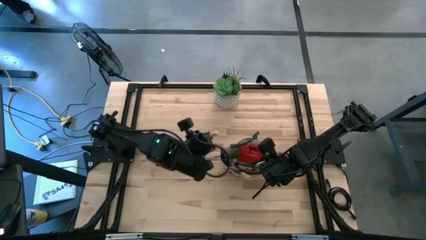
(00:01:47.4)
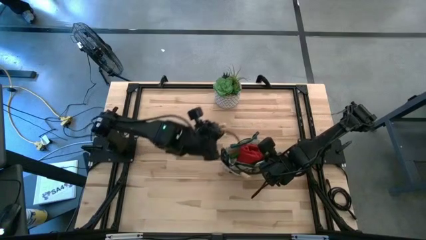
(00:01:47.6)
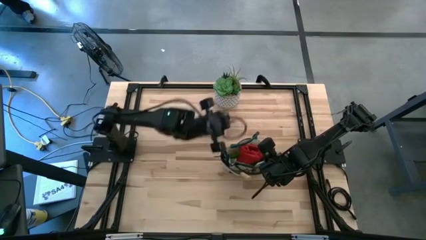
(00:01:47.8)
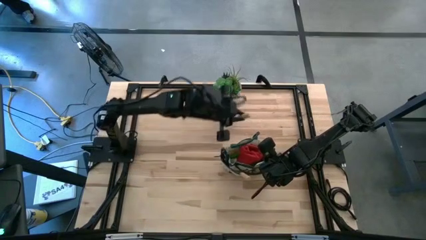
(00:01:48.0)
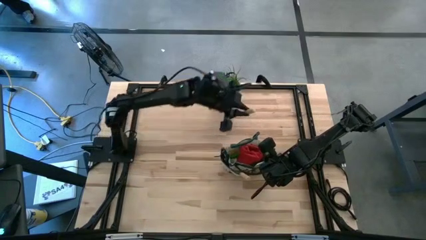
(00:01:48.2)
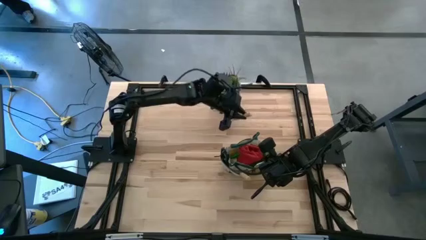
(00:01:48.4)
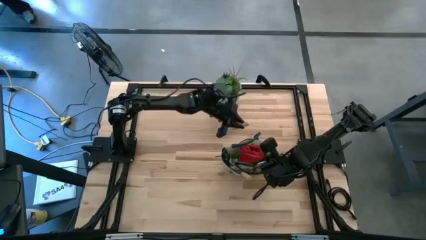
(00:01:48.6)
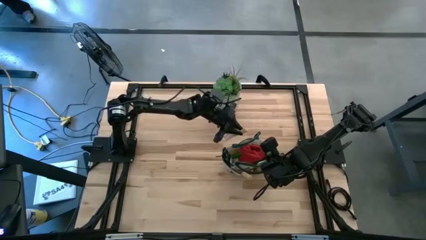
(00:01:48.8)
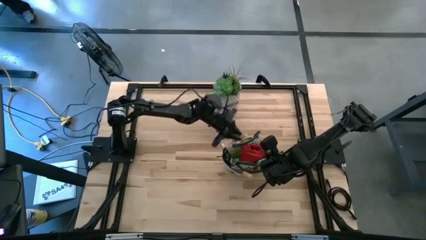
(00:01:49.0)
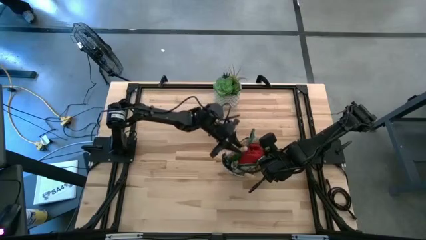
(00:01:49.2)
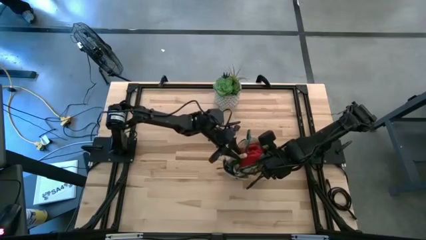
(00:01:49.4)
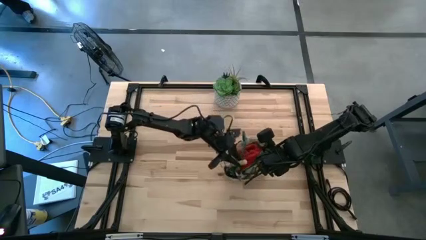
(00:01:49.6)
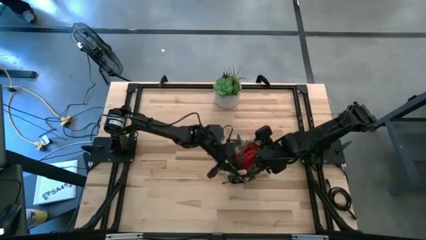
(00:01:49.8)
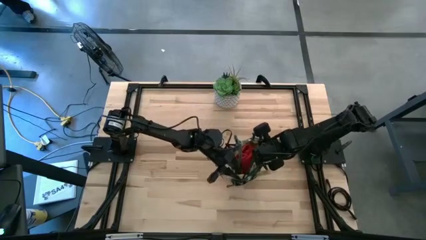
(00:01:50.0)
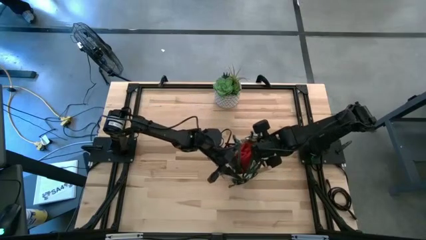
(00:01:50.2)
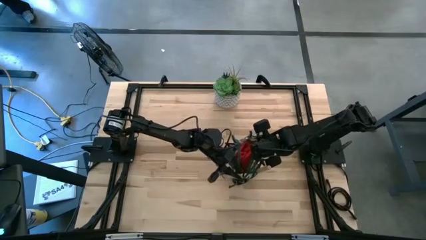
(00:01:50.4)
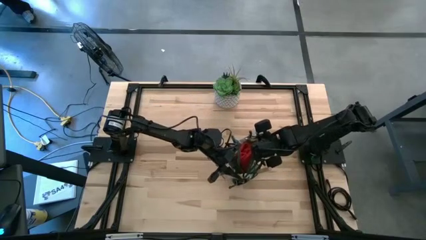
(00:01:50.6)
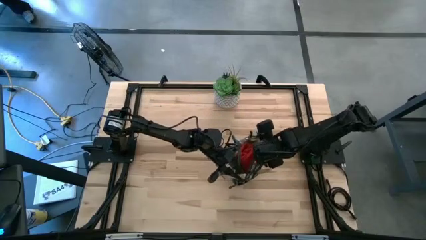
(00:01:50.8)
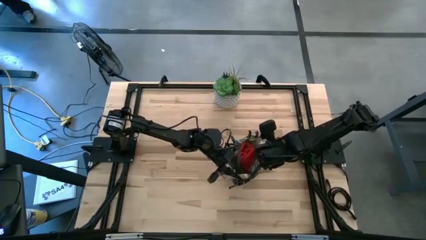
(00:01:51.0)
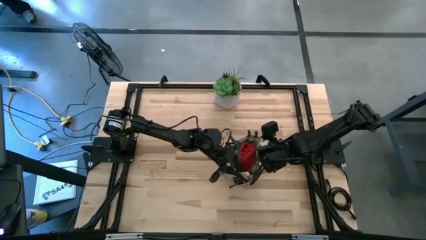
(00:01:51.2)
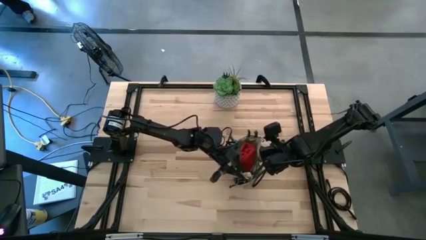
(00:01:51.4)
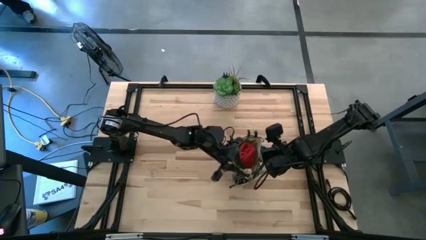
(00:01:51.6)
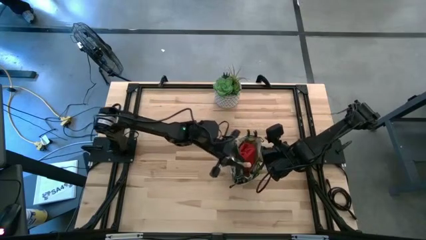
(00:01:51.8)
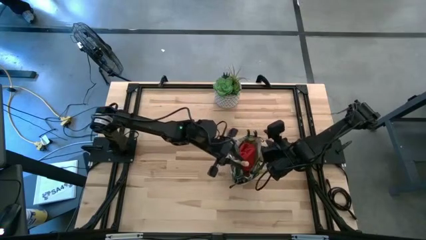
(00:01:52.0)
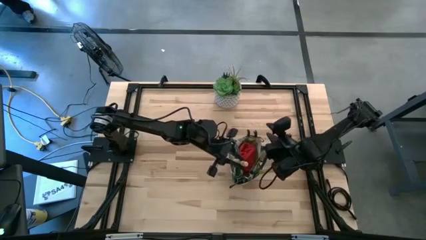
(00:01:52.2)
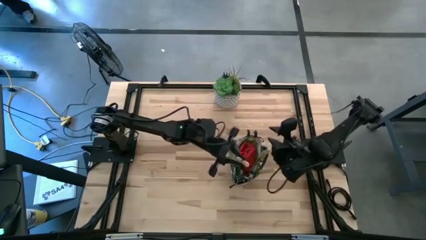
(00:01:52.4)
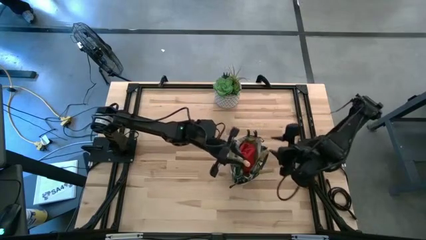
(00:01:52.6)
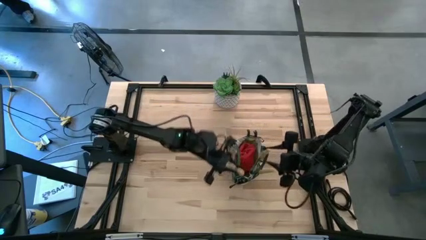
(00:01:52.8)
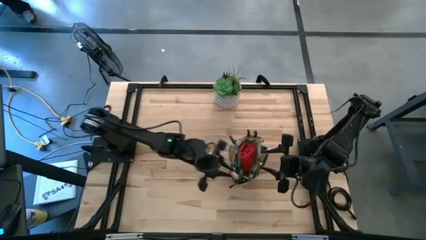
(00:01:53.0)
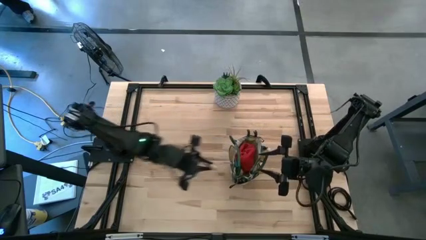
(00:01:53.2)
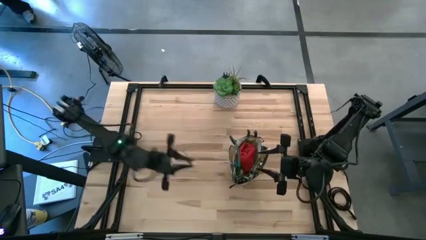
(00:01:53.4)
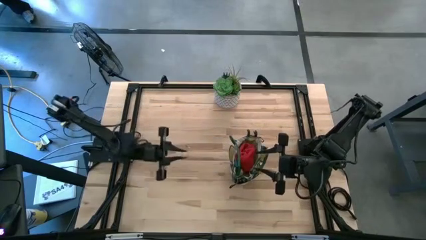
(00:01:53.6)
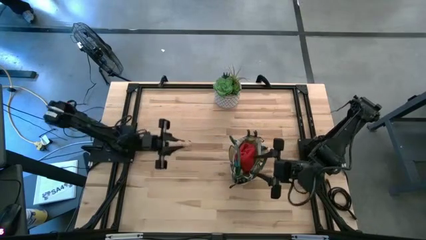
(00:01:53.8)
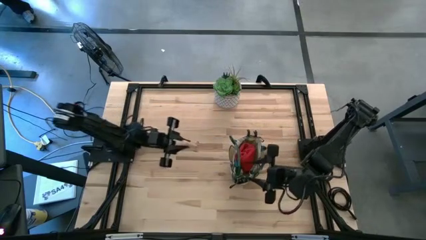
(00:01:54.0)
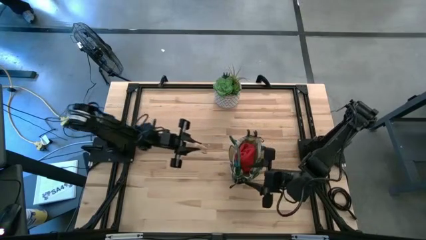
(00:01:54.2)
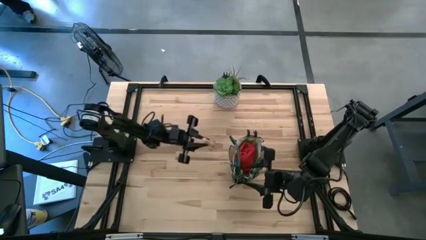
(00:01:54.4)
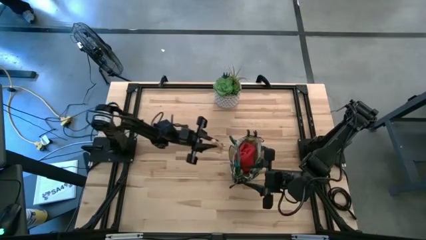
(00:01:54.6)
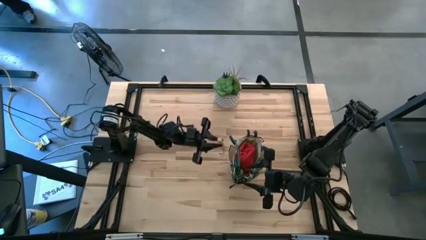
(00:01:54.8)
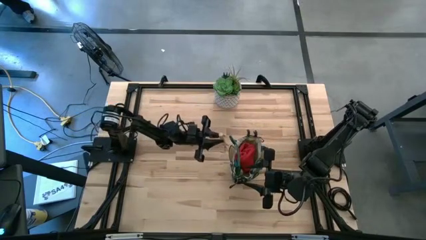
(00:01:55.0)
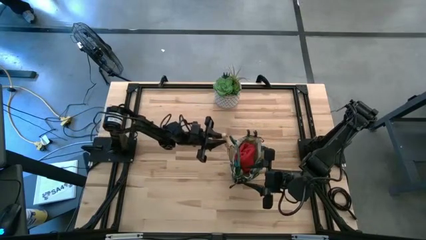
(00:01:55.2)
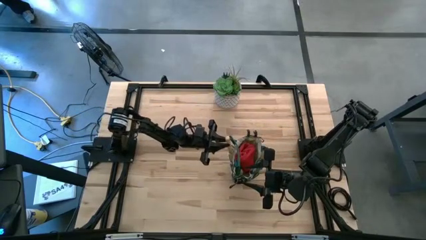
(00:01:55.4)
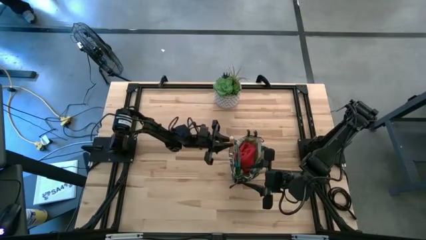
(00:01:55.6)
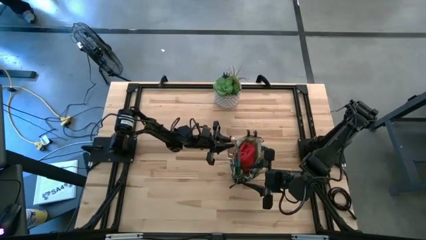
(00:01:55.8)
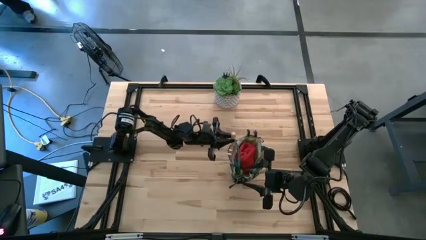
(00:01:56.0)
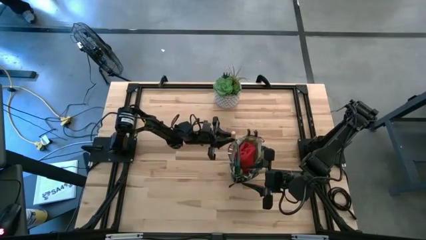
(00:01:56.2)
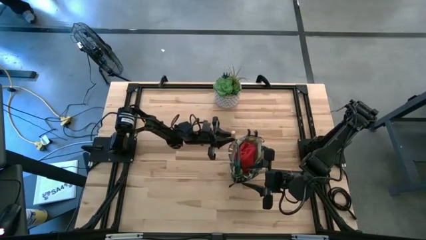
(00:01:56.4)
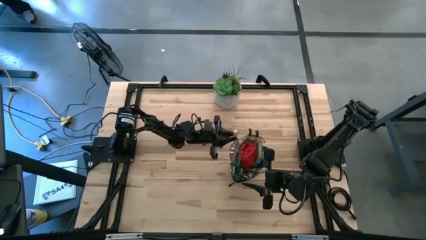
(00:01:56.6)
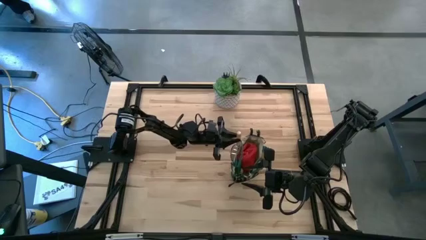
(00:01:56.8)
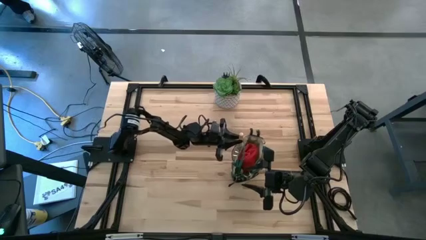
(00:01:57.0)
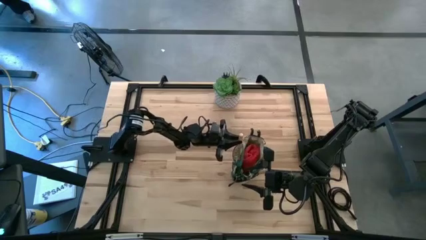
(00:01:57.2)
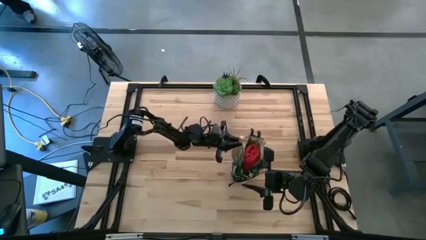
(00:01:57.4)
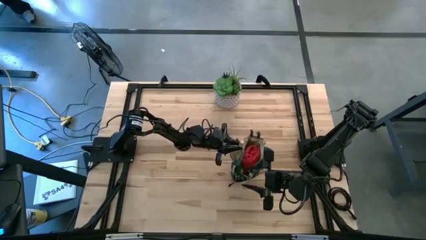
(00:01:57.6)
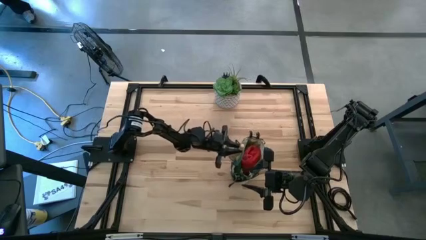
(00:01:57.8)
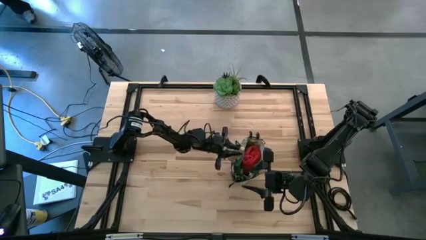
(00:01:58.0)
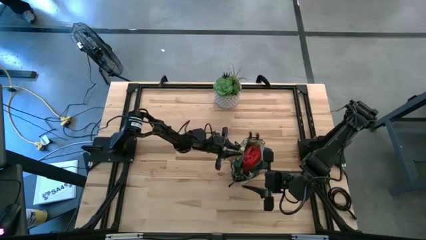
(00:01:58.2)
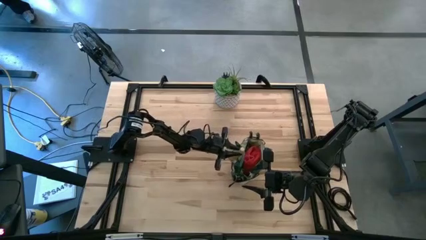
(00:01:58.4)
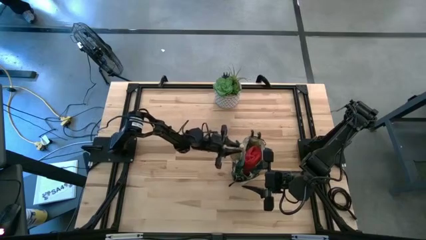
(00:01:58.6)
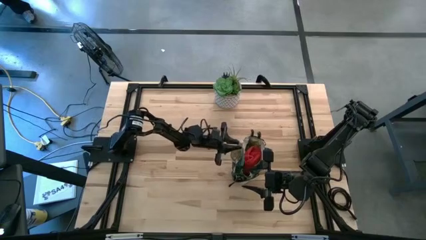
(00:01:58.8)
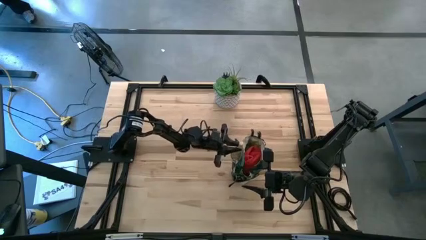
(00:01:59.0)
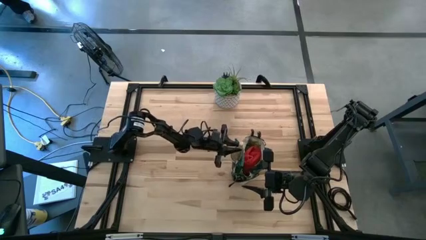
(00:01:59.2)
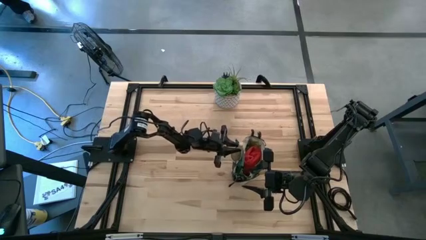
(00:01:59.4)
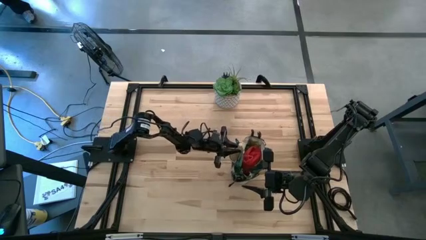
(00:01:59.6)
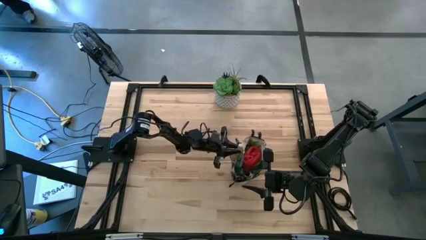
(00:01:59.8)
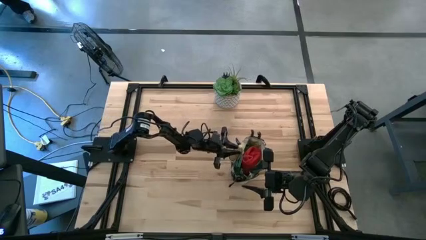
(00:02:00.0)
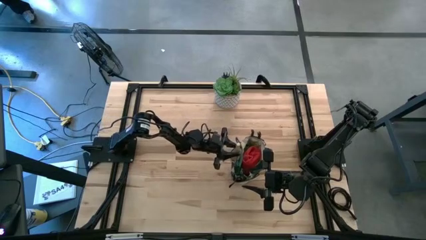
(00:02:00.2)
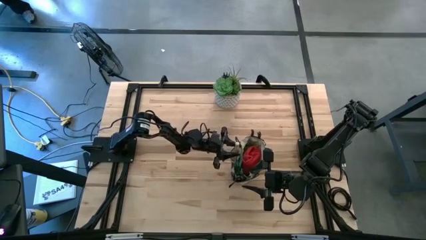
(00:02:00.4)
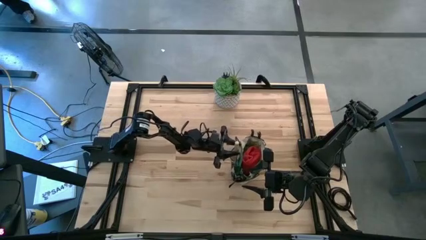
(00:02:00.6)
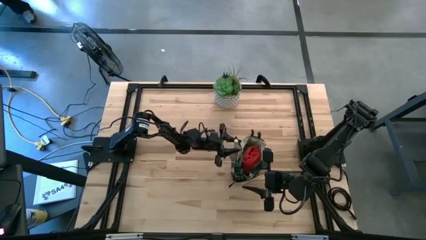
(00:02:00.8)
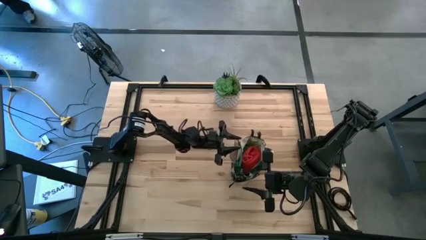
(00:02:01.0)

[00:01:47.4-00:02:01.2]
Task: Pick & Place Garden tools in Gardening bag
Put the light brown hand rake into the white gardening bag
